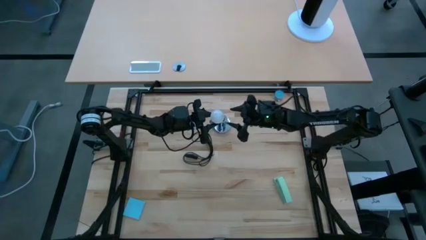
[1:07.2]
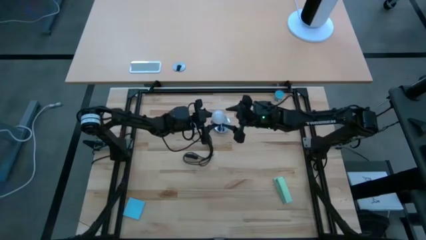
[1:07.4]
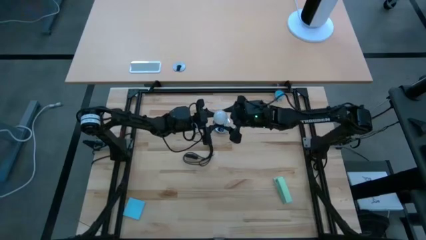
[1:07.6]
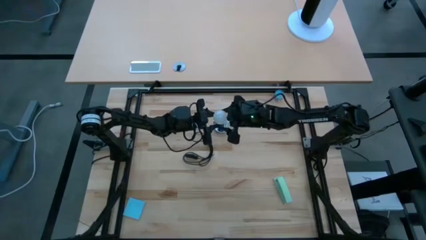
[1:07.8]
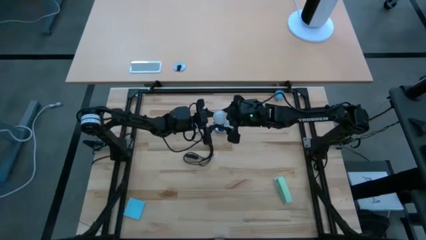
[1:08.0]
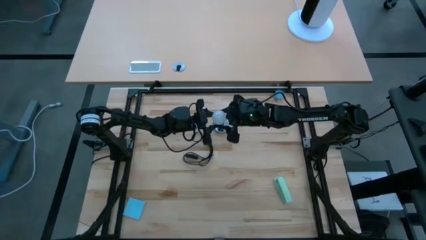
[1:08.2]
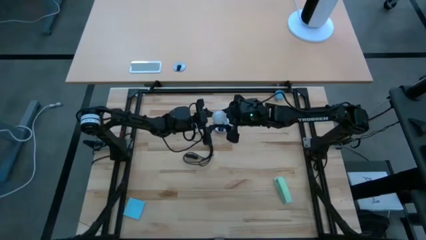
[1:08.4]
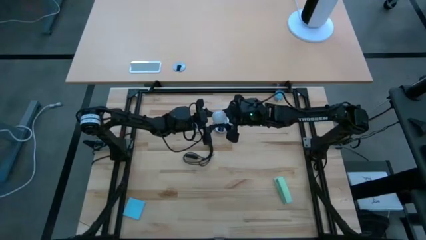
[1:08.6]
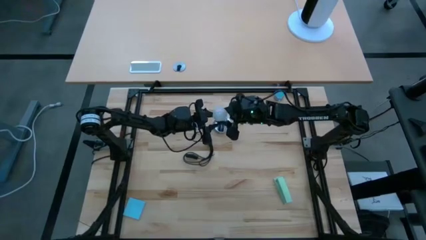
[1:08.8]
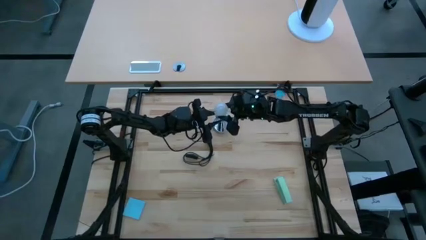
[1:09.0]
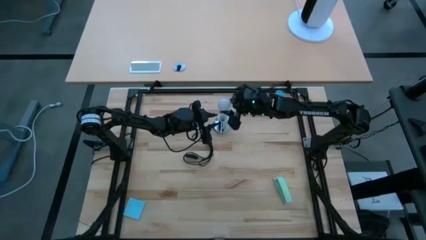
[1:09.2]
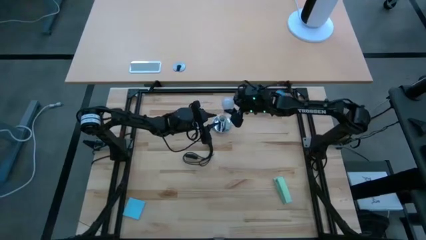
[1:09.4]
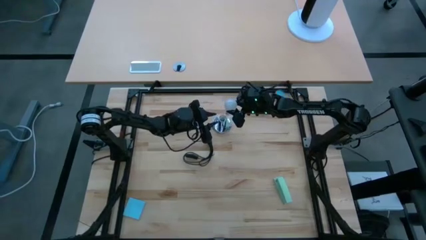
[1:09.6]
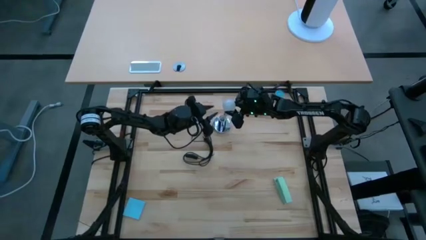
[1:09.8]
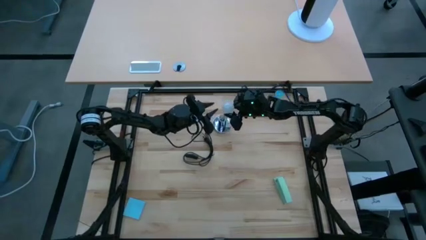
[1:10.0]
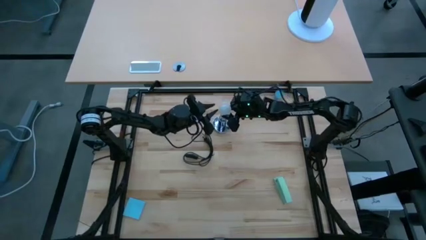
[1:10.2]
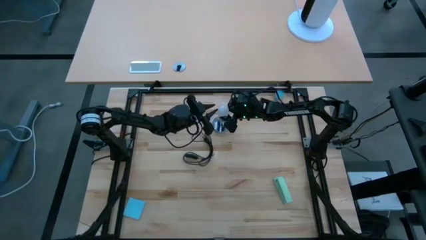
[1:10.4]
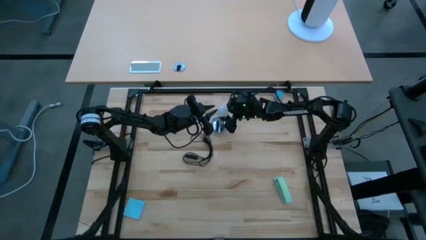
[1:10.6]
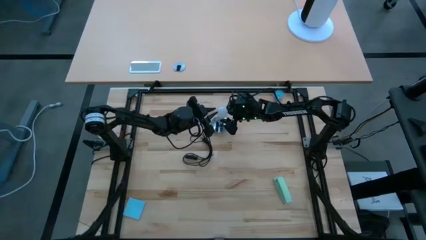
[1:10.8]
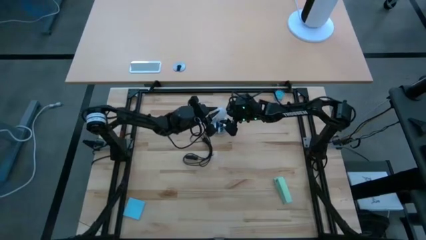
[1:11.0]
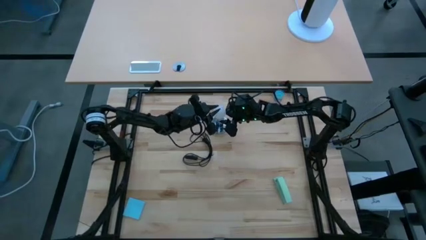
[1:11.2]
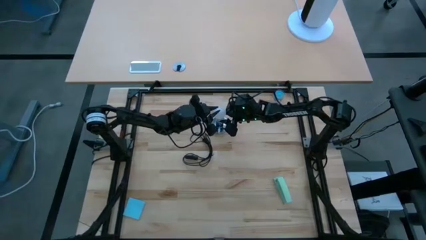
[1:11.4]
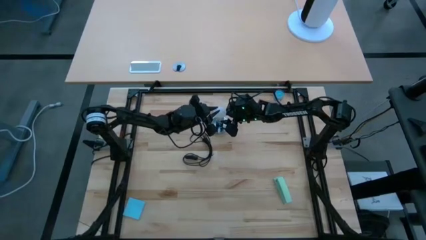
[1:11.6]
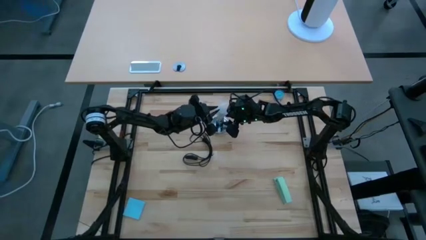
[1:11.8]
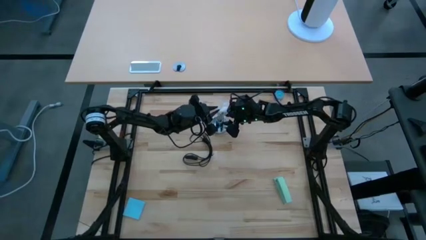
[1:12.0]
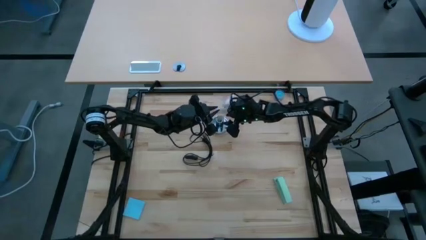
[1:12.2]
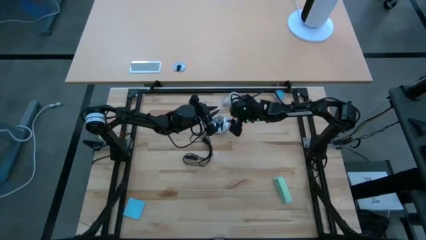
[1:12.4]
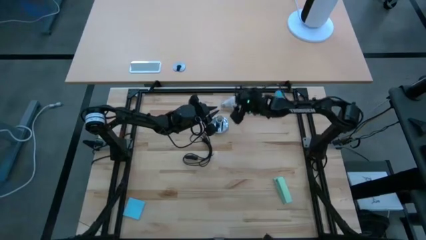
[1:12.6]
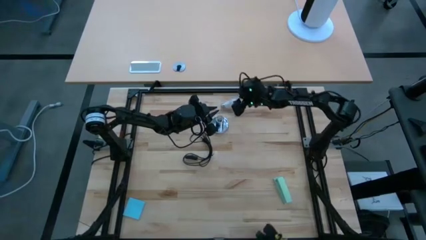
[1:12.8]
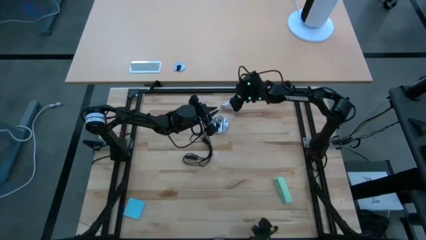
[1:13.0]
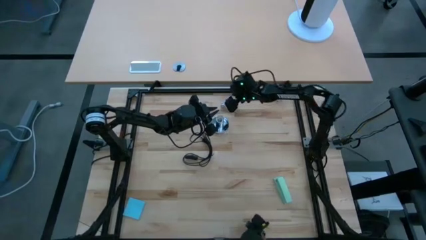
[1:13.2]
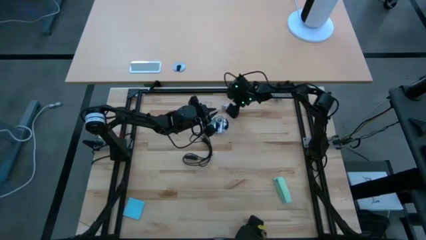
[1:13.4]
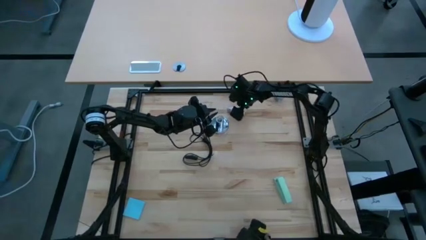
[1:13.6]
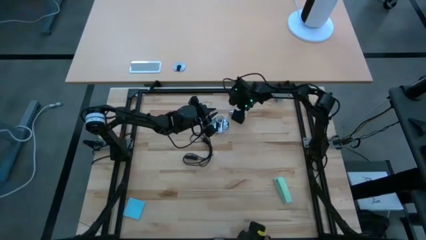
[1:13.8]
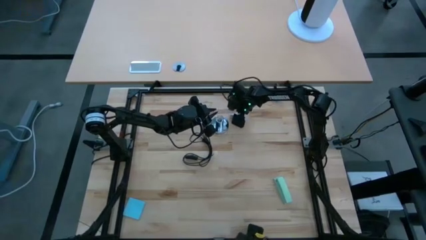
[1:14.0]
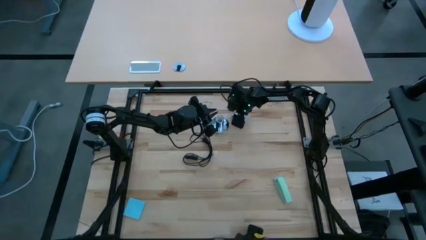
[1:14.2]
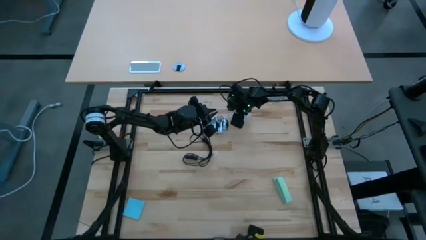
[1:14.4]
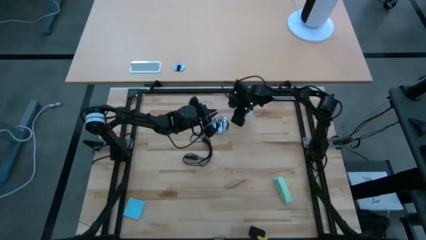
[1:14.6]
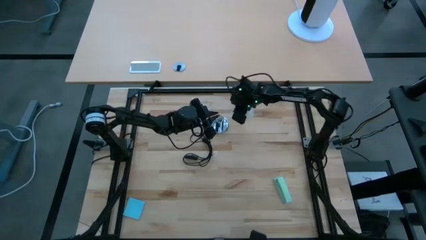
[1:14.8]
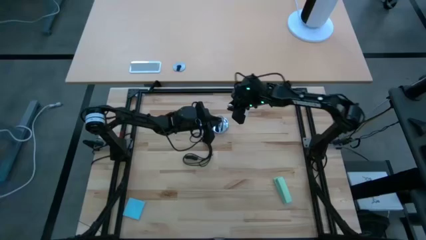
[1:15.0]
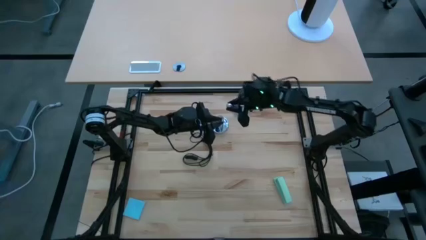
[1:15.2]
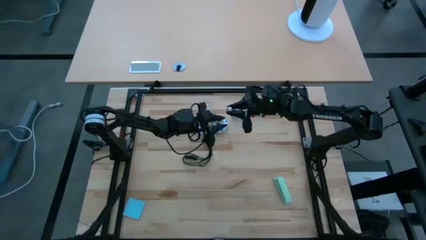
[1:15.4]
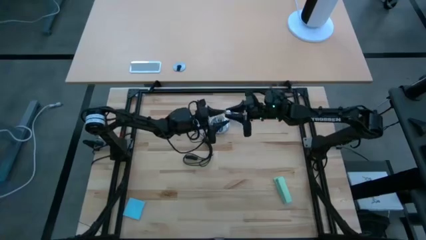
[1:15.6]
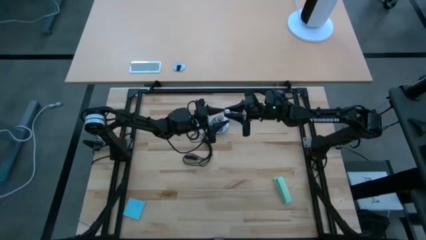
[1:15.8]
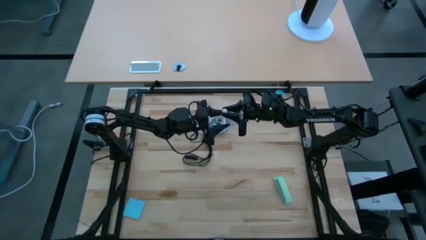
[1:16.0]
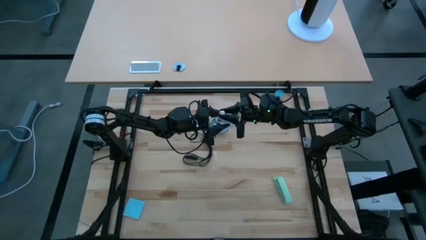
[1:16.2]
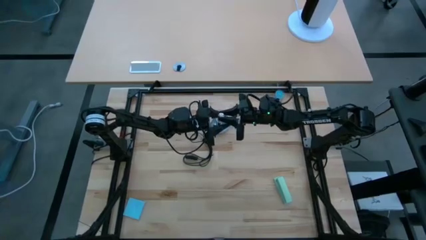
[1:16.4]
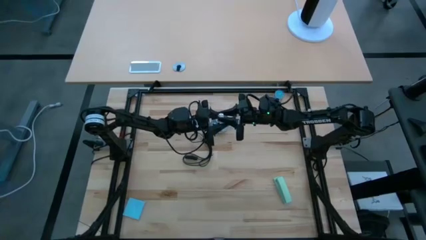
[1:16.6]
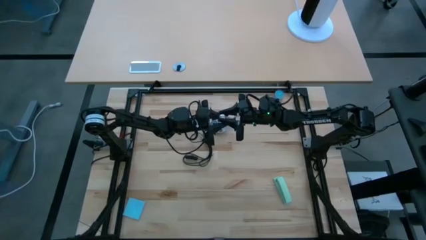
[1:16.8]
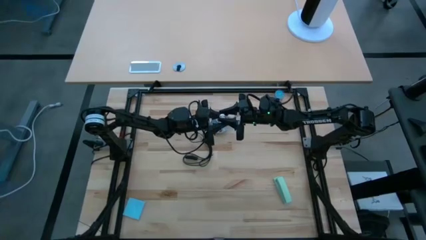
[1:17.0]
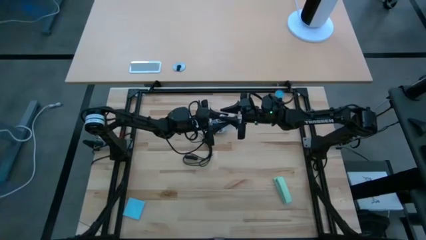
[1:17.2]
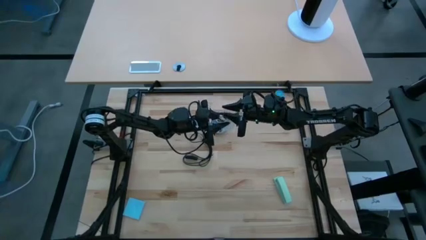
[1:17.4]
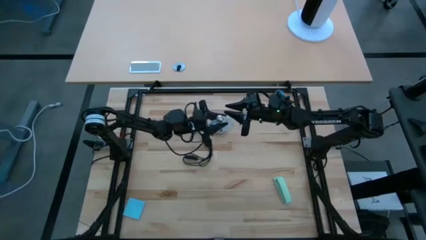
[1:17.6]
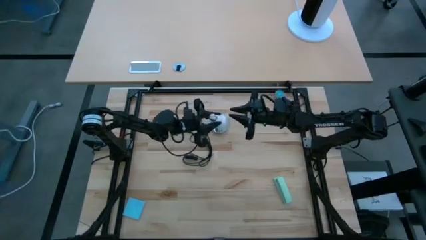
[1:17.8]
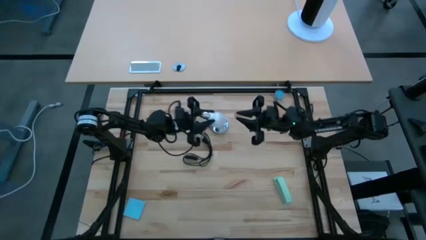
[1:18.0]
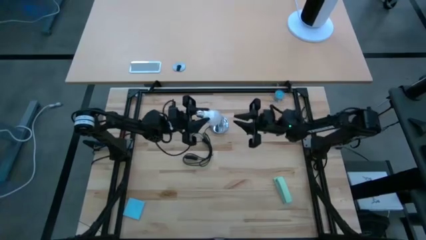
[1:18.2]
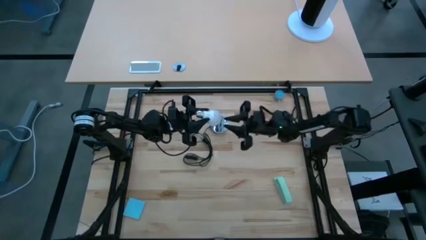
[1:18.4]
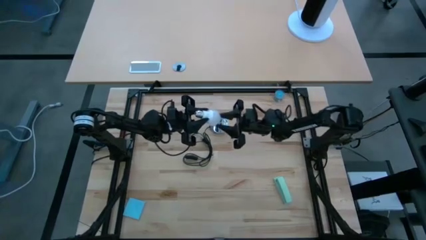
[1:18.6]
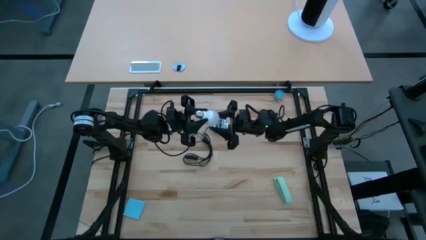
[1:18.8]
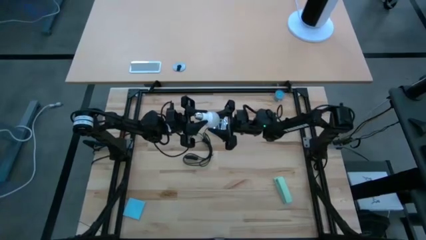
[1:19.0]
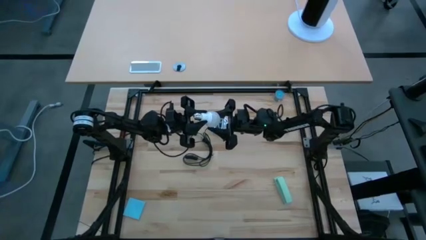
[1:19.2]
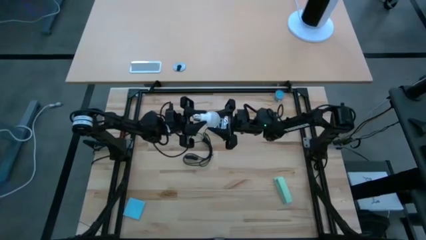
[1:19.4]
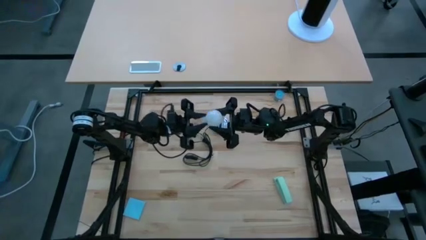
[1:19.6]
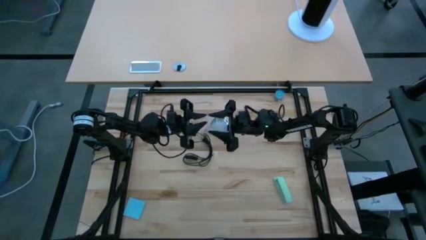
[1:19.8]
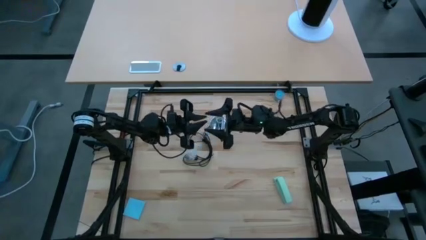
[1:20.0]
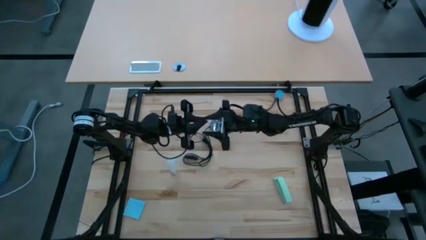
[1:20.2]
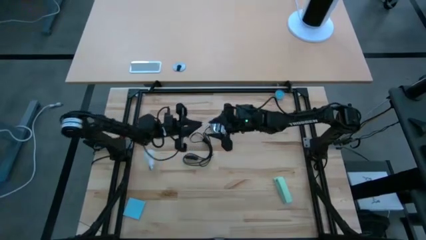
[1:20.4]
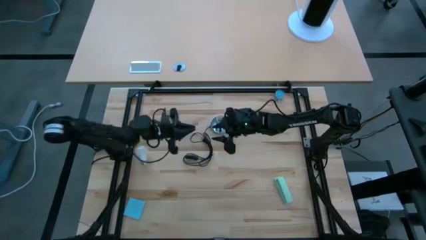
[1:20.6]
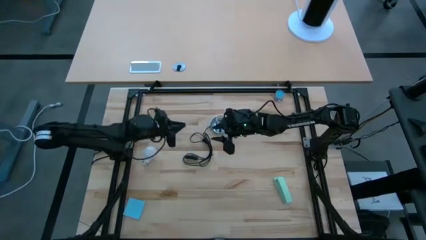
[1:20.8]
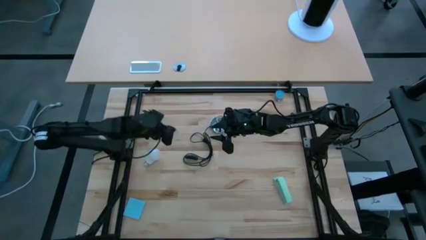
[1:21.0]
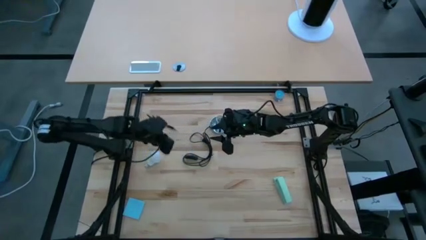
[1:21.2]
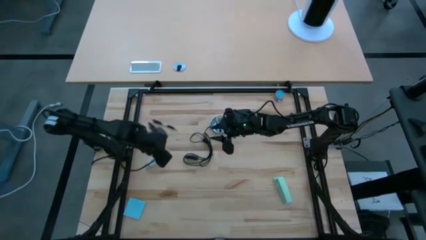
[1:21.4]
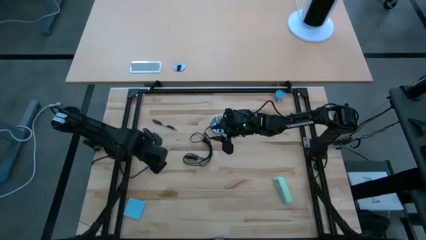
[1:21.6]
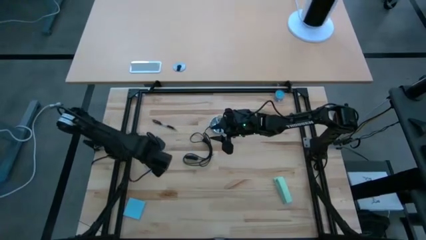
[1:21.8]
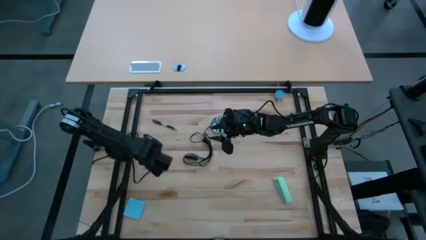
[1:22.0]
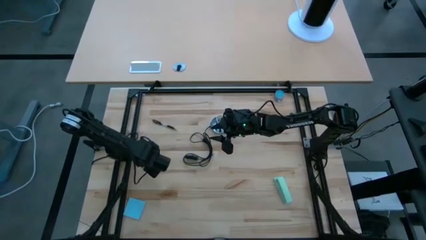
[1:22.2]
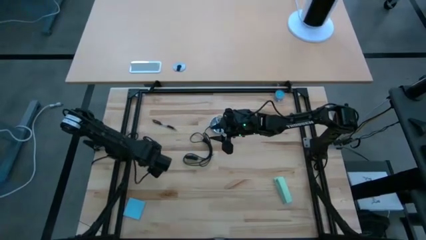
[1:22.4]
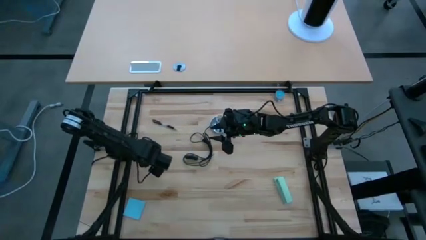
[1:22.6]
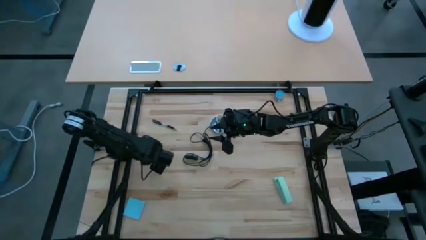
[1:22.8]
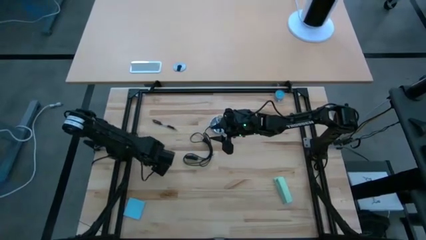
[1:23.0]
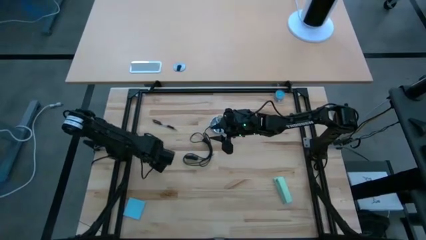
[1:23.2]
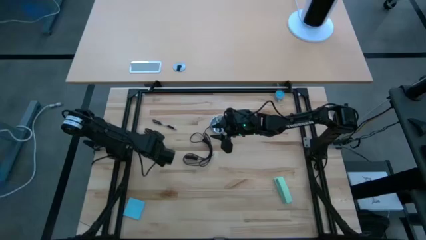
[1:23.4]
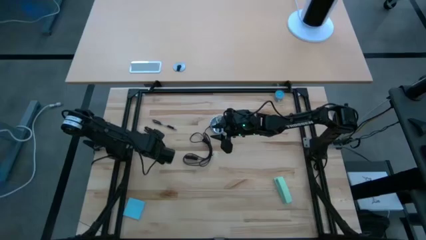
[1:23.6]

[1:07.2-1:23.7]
Task: Screw lightbulb
Insert the lightbulb into the lamp
